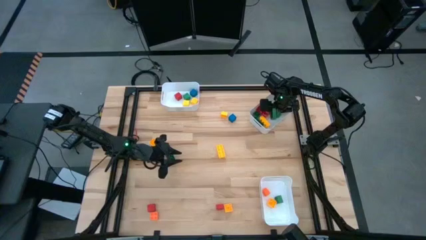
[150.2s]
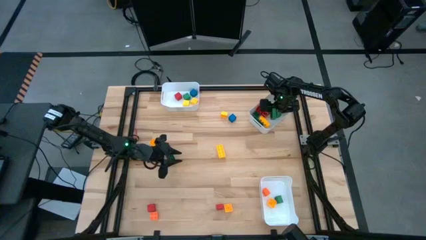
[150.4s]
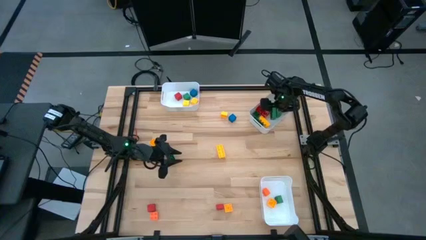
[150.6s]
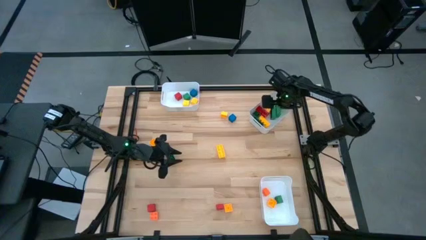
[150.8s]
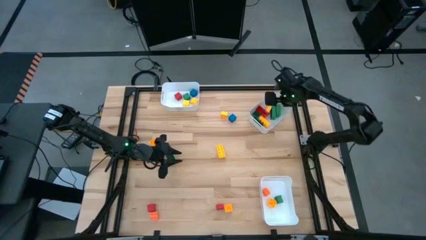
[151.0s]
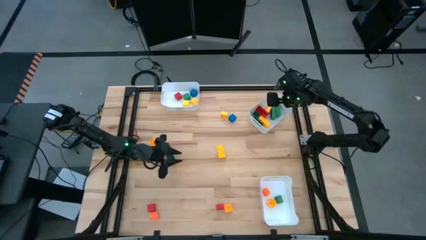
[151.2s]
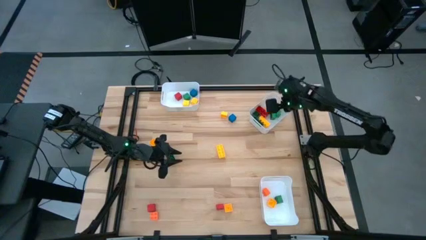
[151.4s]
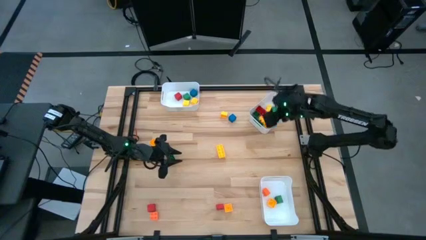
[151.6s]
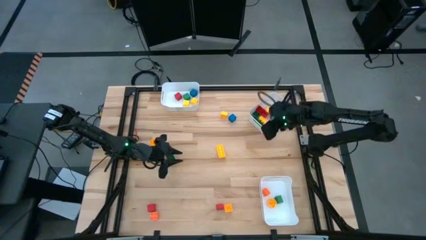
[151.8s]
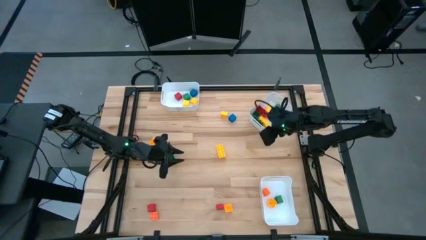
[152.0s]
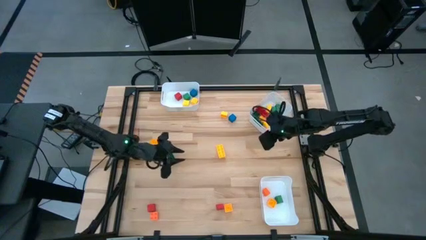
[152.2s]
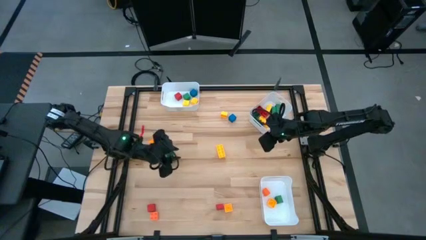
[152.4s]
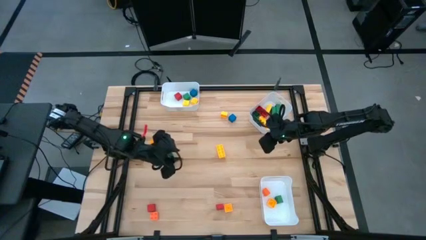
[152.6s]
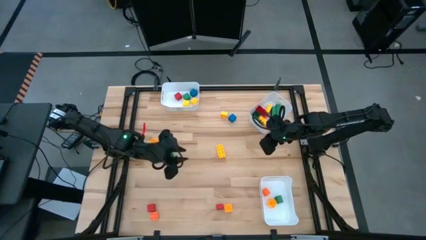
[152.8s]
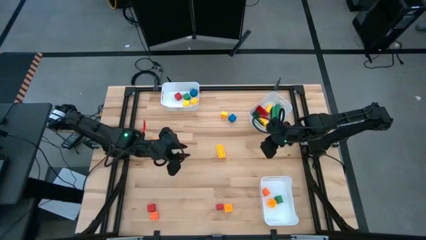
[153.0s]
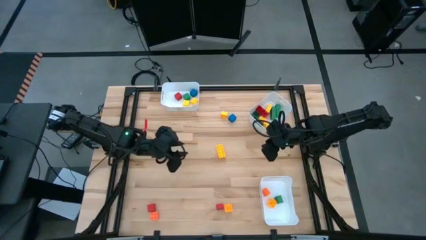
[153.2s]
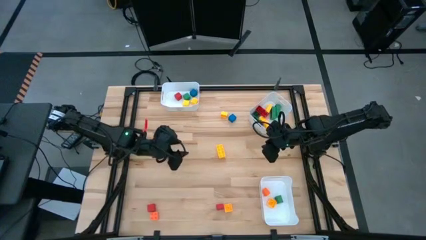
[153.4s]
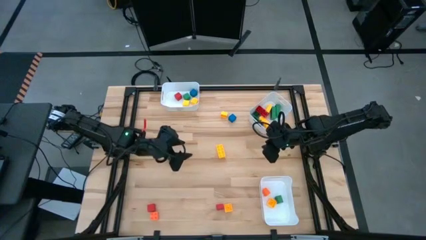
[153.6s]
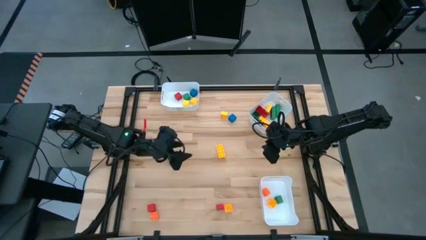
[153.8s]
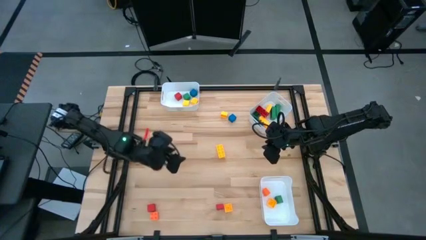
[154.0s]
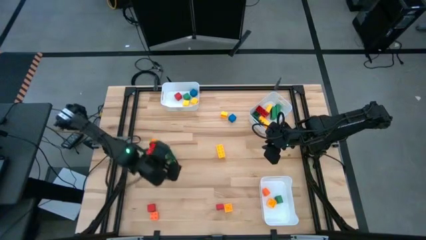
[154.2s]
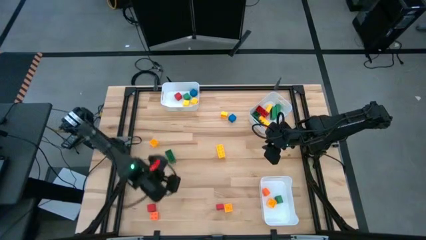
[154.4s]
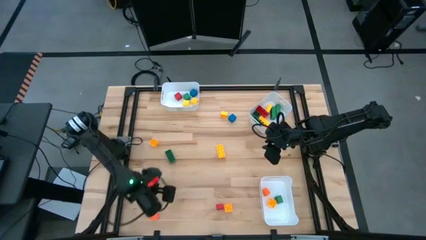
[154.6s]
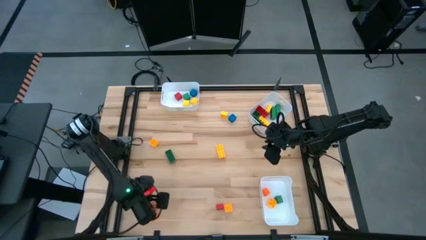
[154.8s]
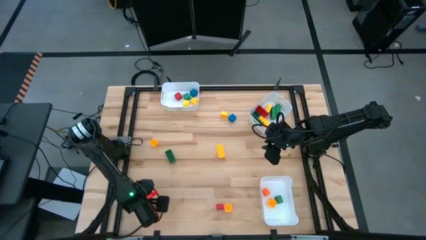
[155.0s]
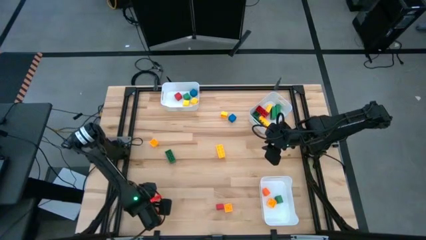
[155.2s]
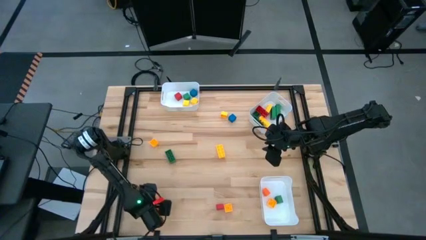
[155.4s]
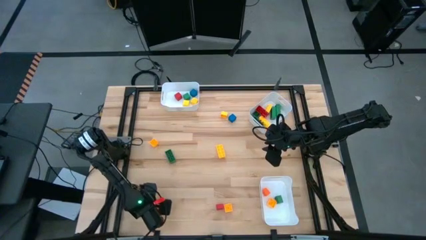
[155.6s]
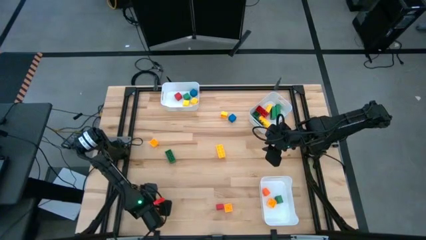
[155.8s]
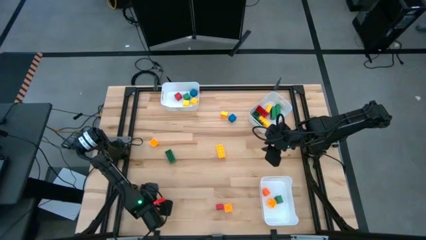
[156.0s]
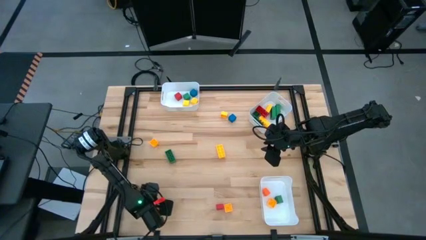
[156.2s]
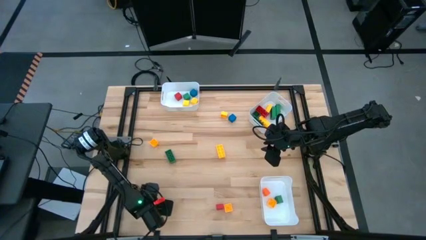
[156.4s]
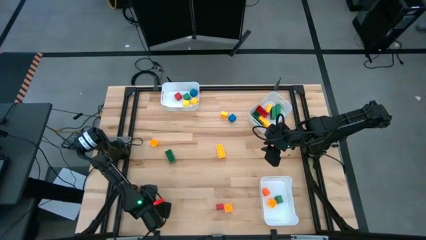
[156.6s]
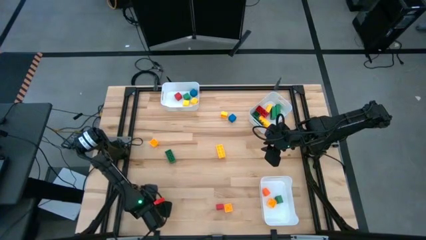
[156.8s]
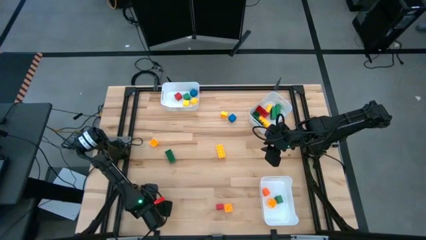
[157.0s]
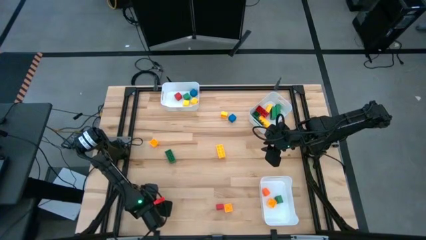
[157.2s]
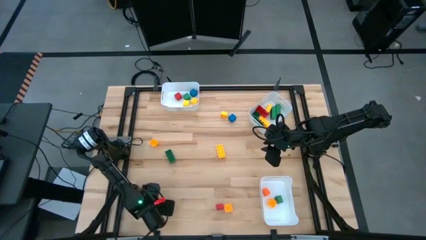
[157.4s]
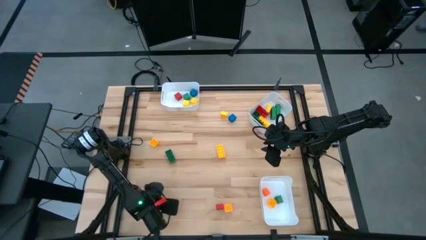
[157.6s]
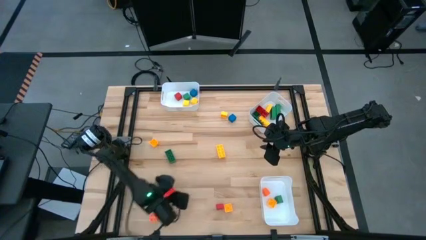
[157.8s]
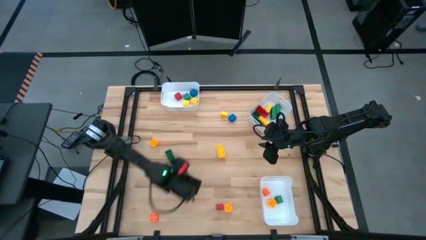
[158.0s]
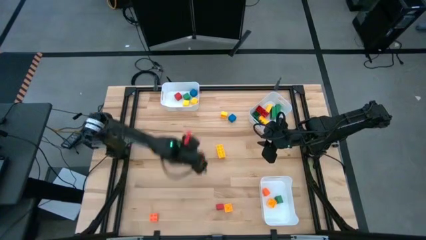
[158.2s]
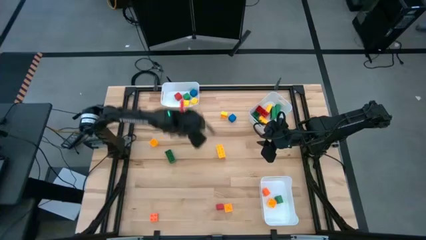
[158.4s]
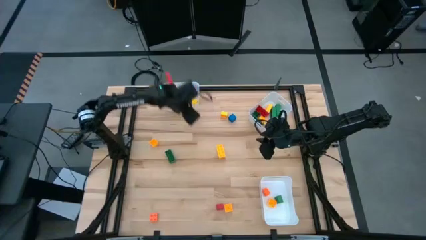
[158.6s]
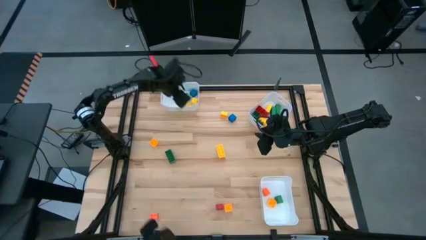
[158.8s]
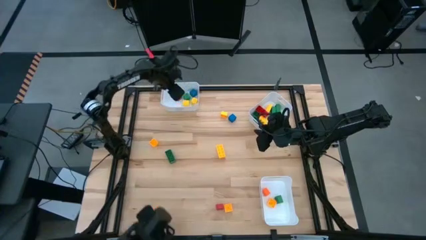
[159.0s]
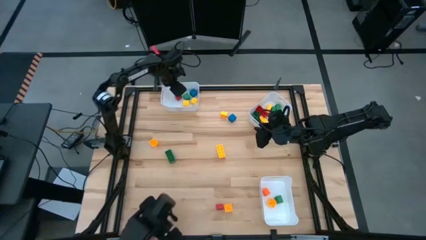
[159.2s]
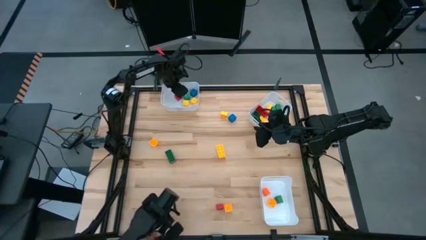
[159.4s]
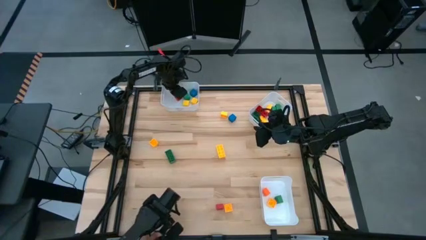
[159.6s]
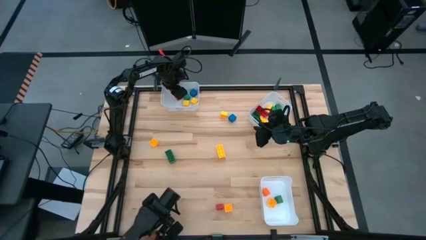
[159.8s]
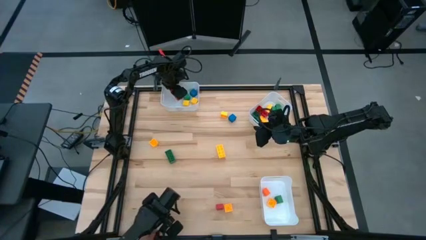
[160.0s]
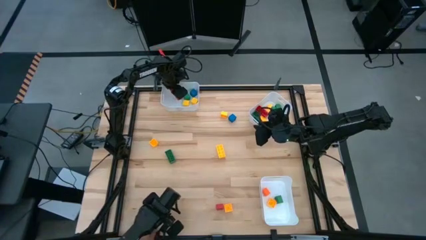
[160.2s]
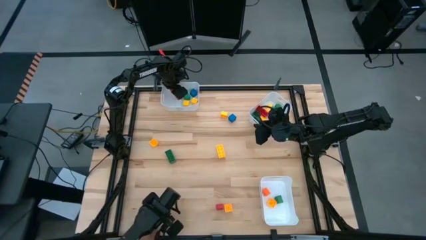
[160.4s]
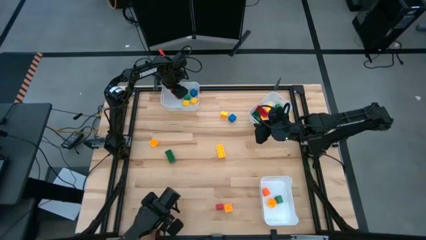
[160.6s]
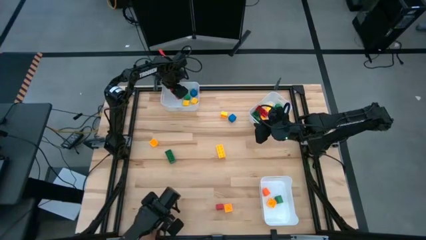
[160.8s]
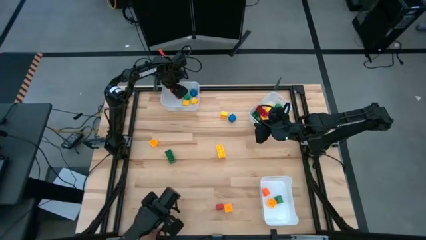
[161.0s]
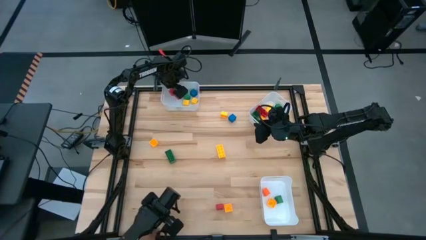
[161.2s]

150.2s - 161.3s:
Task: Sort blocks by size
Put the red square block into the top left white bin

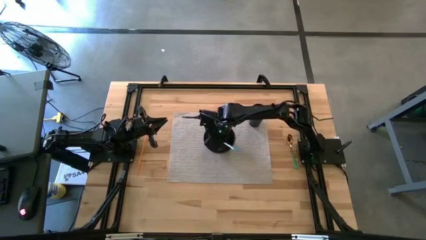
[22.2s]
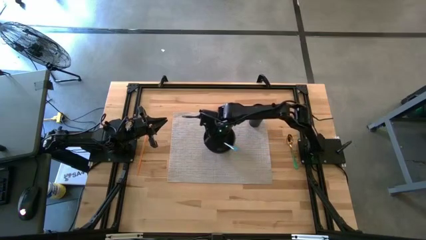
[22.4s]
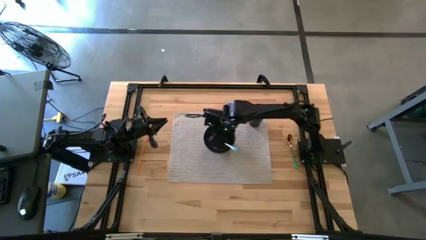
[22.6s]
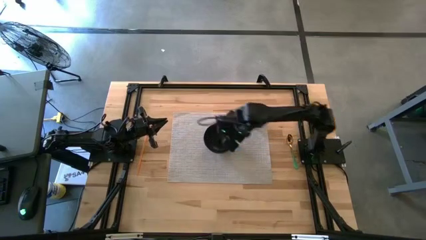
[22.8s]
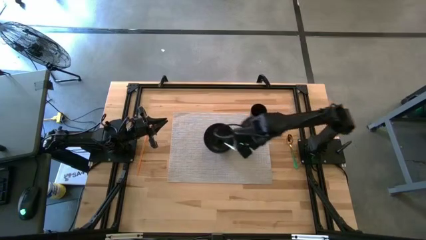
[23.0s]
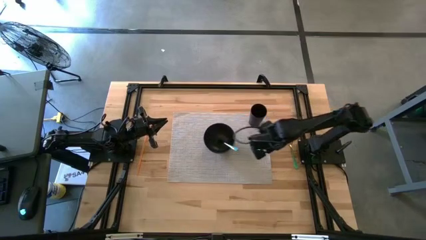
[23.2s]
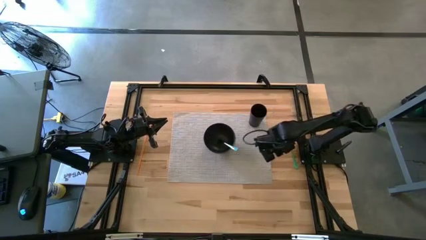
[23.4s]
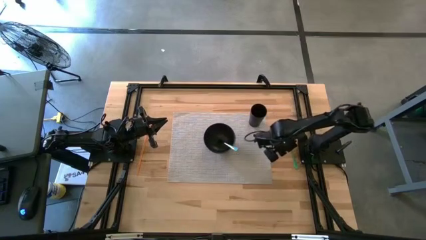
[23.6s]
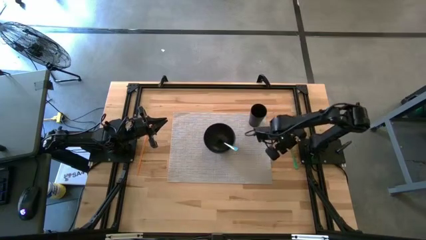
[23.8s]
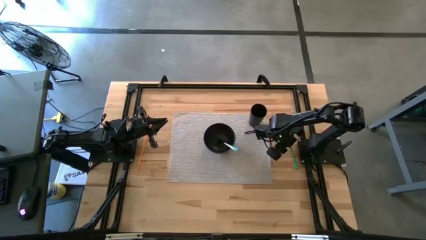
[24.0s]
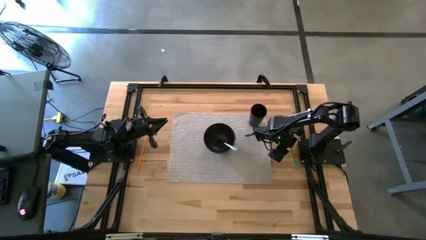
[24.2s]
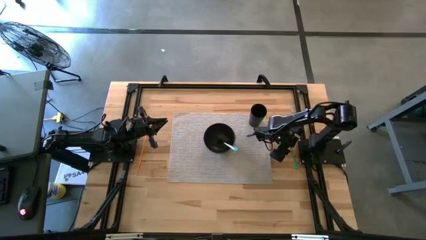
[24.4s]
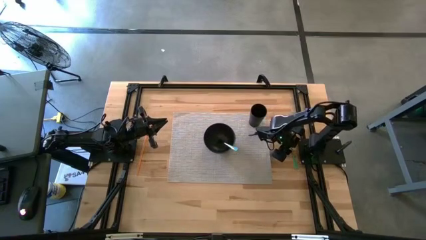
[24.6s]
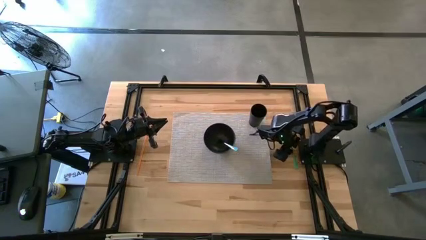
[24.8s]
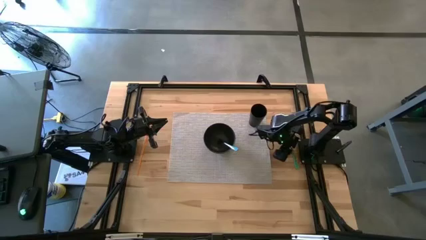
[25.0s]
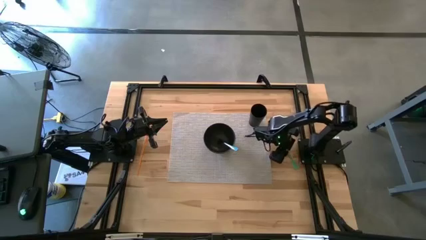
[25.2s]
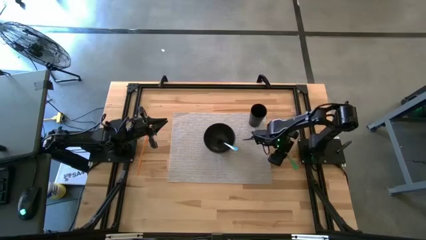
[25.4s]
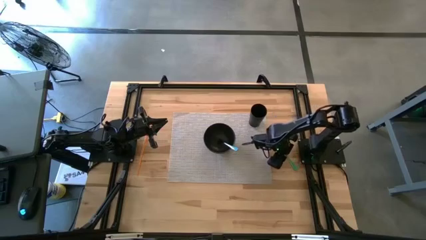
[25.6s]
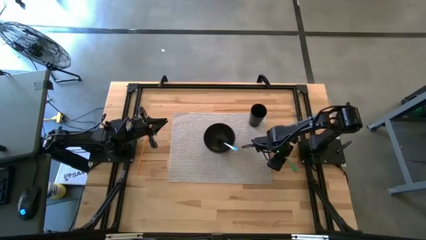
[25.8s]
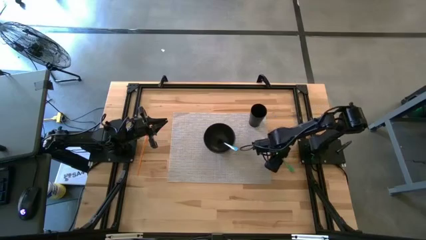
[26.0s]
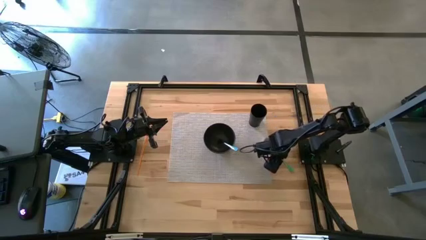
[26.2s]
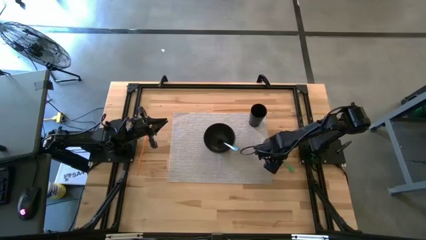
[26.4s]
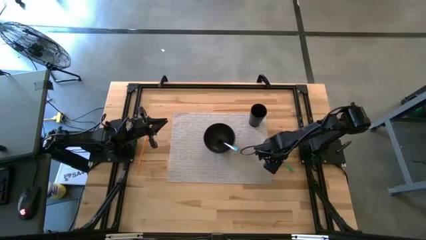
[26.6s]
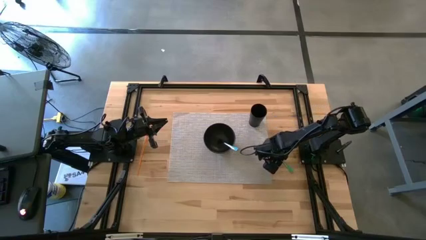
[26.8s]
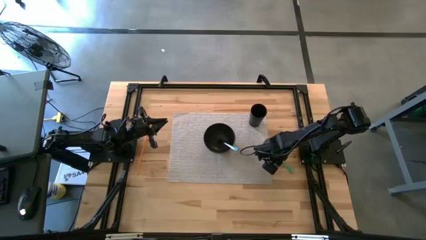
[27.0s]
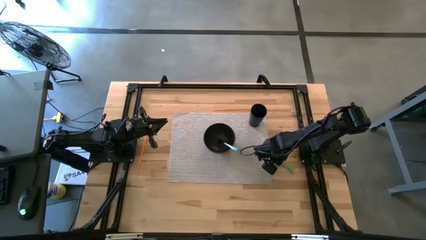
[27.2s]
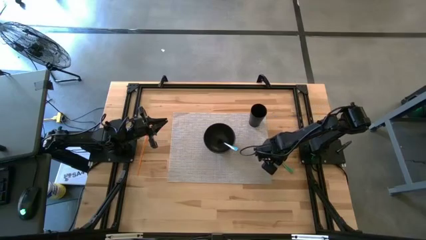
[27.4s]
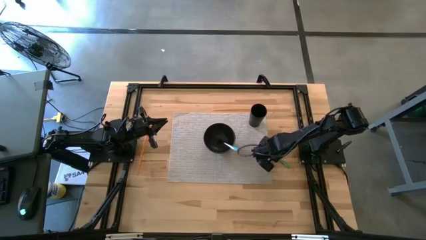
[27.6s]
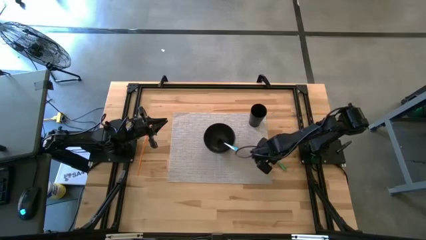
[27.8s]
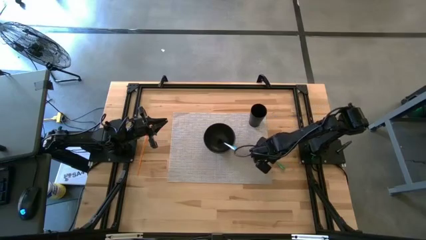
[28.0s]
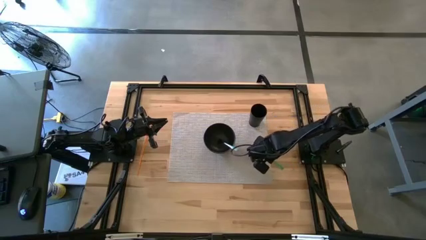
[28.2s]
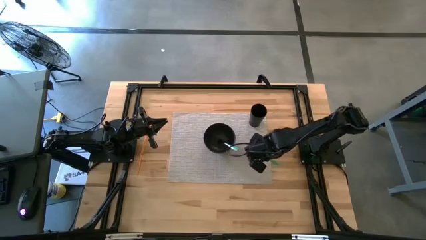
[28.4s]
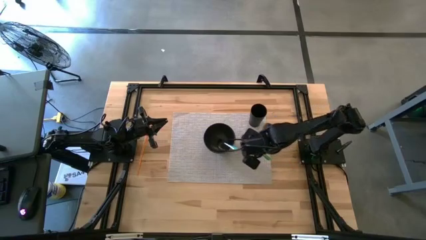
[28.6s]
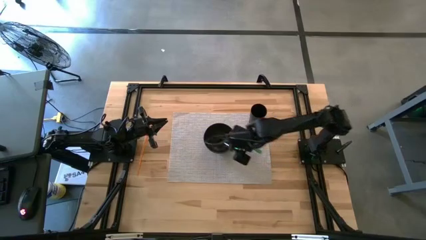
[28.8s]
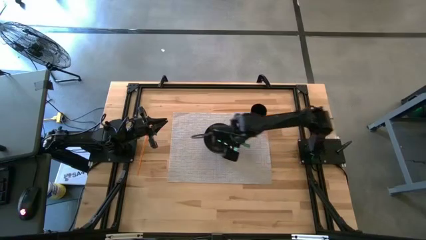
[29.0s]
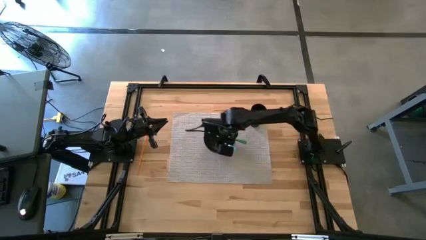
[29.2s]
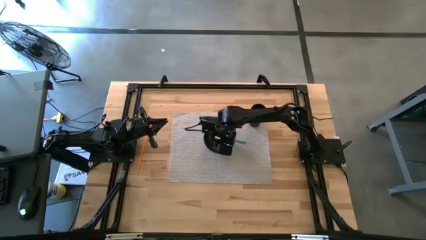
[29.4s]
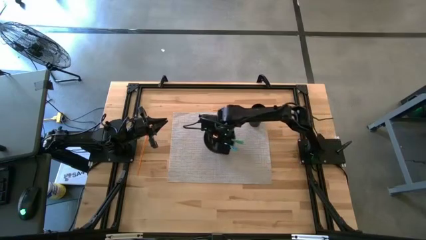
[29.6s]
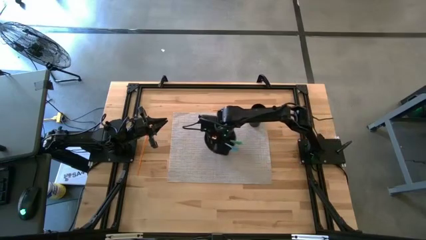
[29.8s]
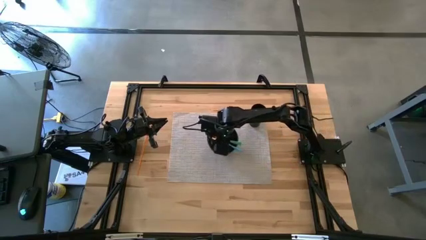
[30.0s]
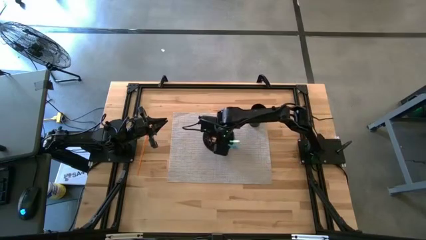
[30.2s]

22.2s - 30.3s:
Task: Pick & Place Utensil
Put the green spoon into the black bowl on the gray mat
